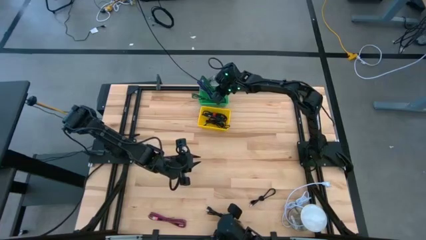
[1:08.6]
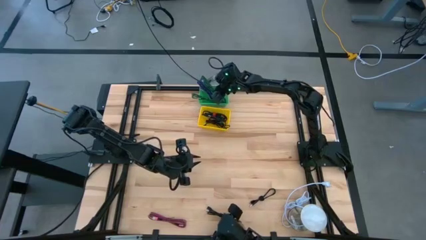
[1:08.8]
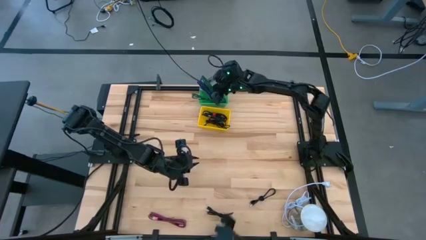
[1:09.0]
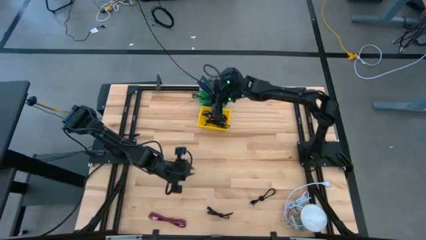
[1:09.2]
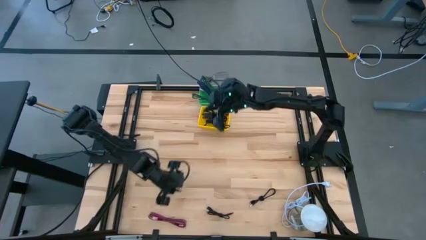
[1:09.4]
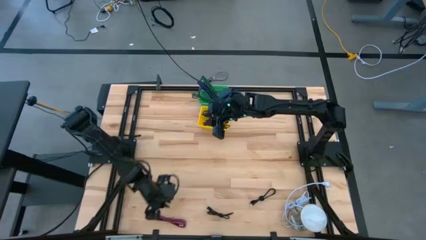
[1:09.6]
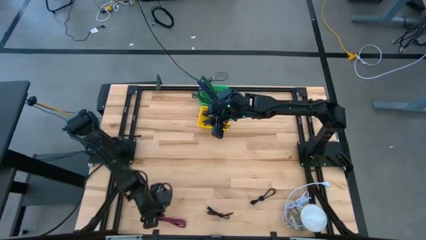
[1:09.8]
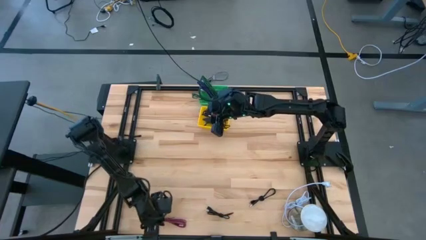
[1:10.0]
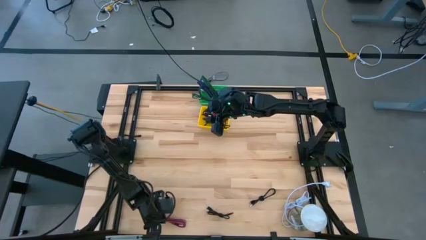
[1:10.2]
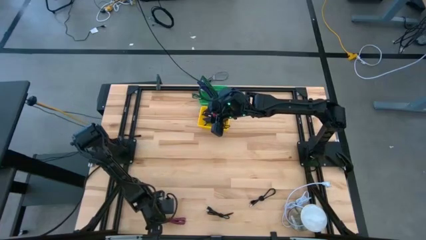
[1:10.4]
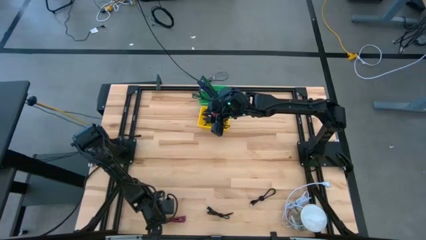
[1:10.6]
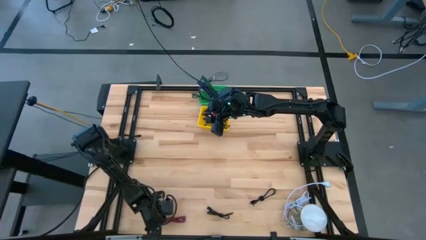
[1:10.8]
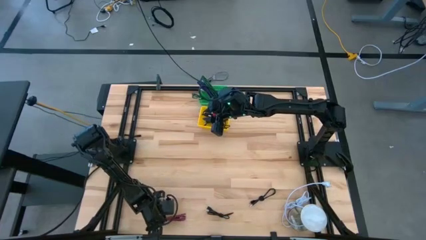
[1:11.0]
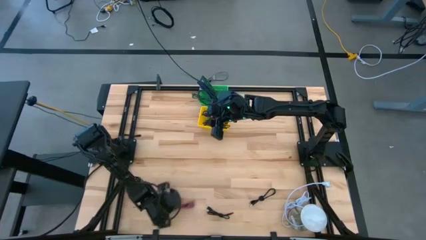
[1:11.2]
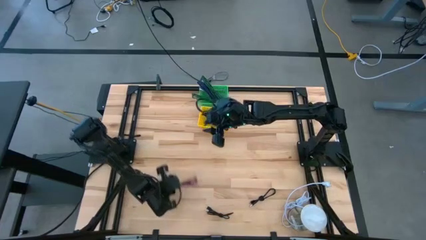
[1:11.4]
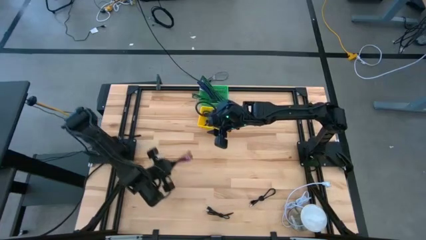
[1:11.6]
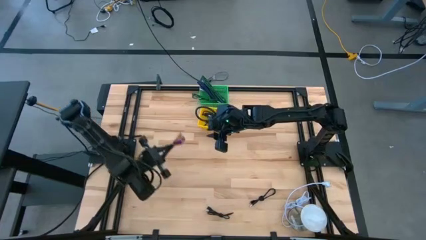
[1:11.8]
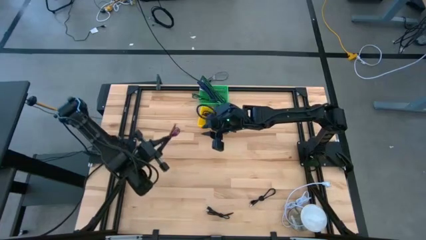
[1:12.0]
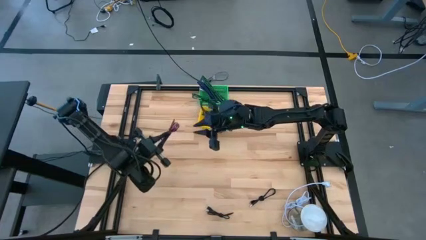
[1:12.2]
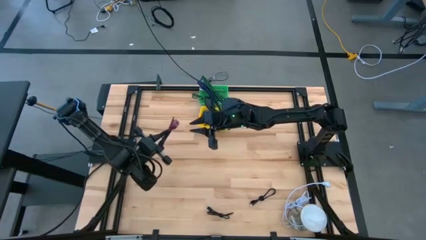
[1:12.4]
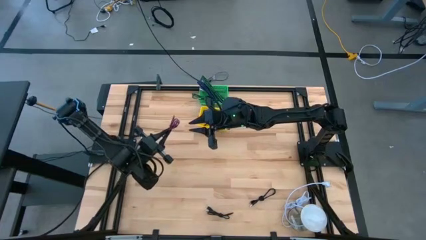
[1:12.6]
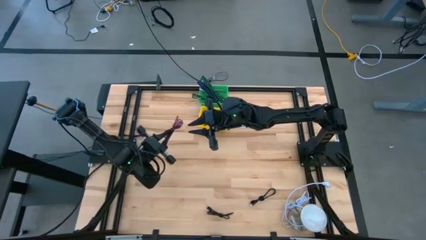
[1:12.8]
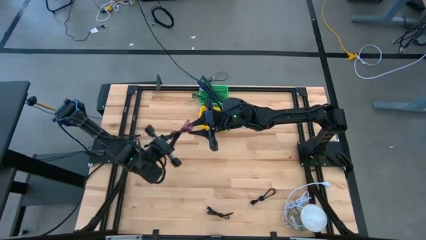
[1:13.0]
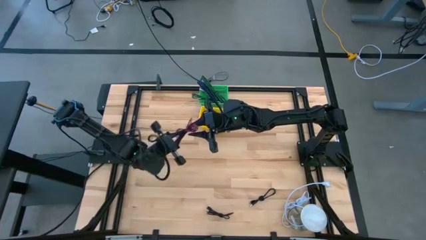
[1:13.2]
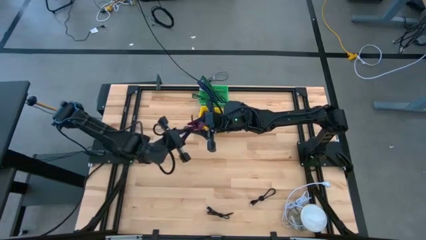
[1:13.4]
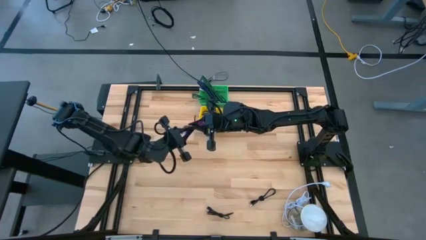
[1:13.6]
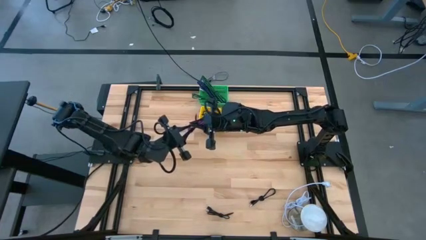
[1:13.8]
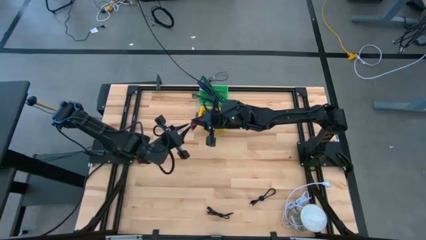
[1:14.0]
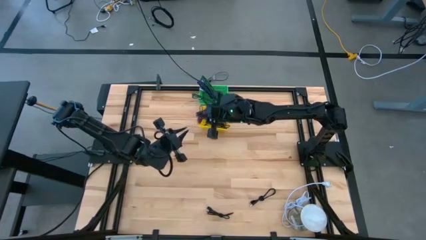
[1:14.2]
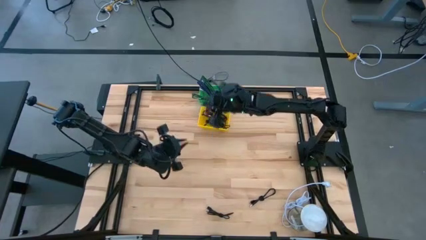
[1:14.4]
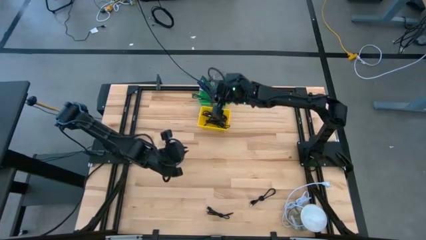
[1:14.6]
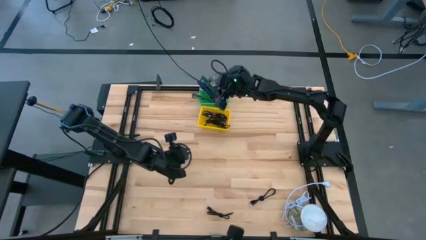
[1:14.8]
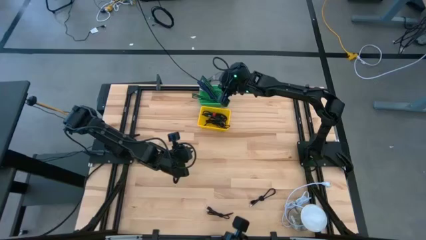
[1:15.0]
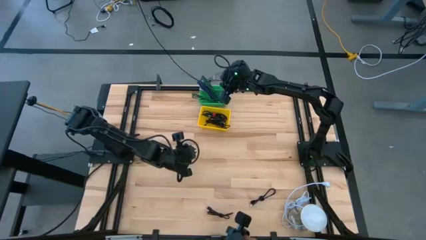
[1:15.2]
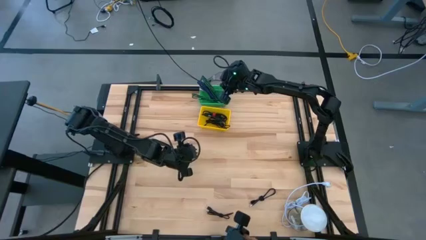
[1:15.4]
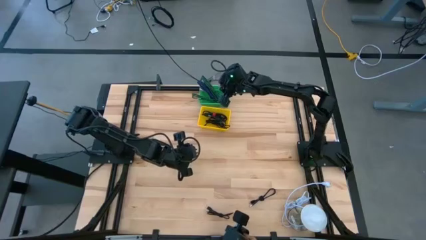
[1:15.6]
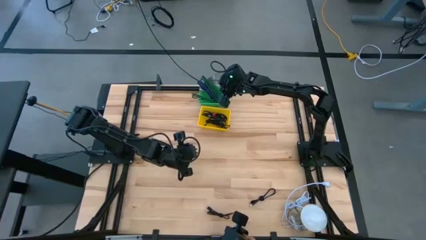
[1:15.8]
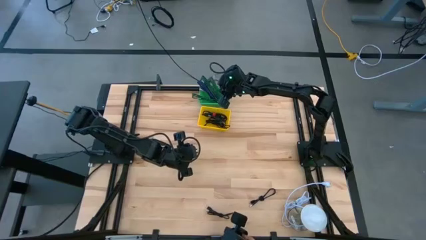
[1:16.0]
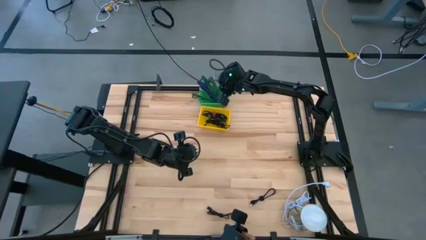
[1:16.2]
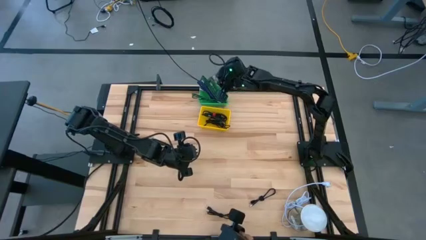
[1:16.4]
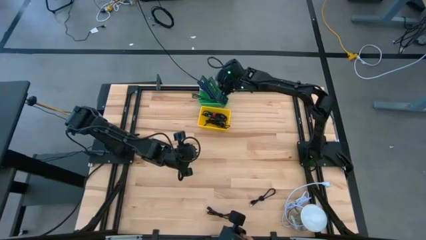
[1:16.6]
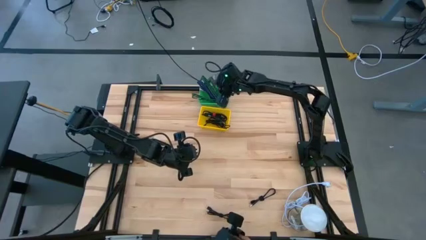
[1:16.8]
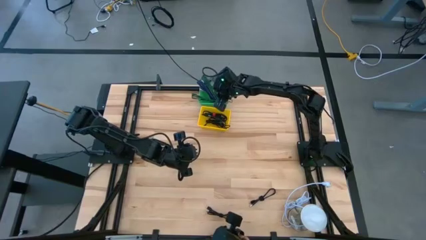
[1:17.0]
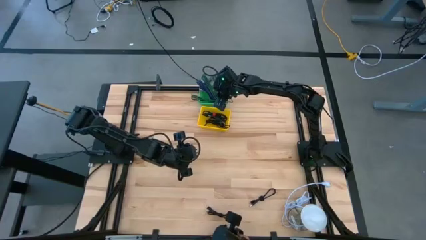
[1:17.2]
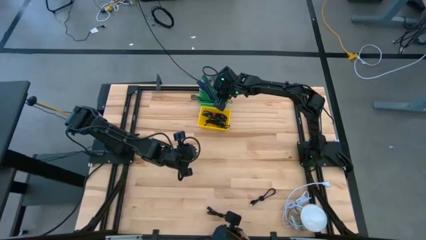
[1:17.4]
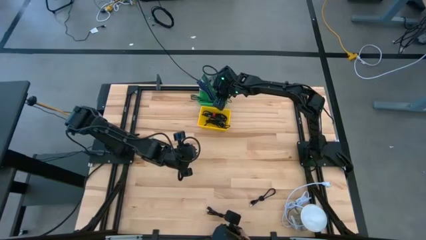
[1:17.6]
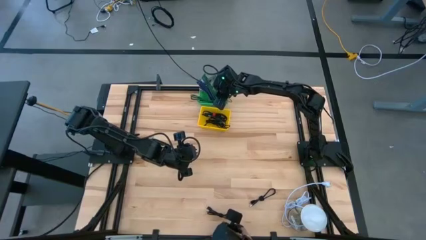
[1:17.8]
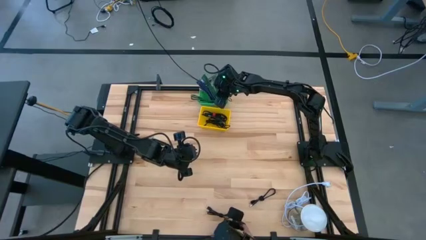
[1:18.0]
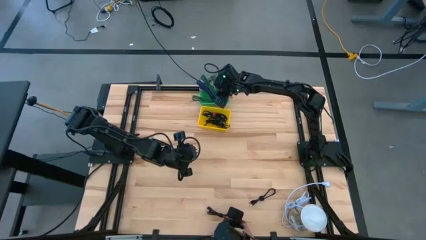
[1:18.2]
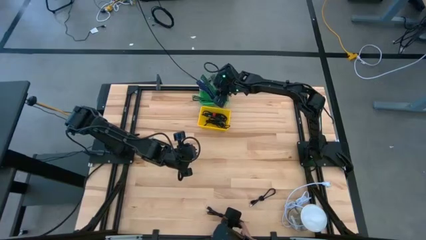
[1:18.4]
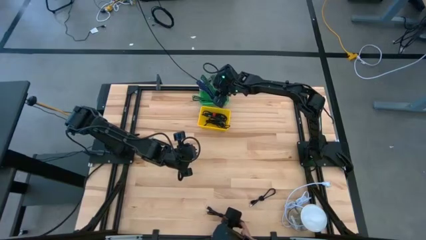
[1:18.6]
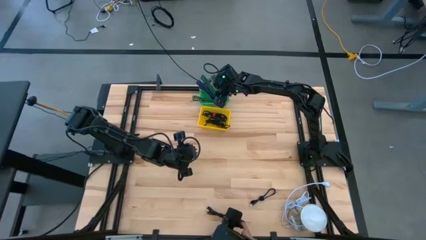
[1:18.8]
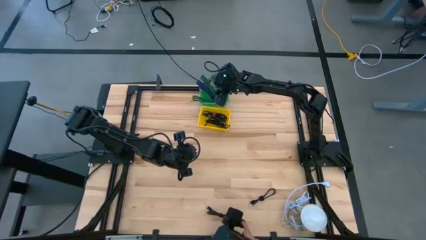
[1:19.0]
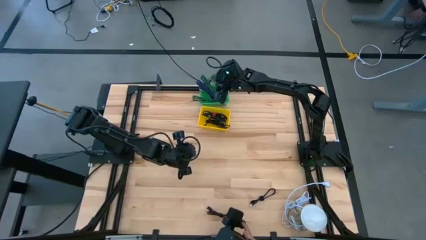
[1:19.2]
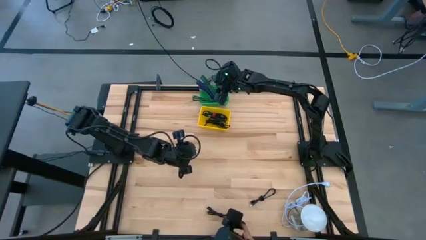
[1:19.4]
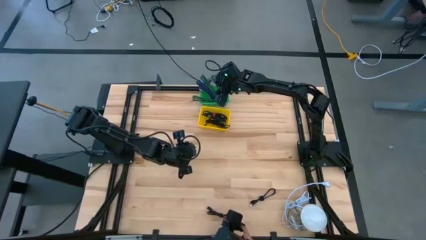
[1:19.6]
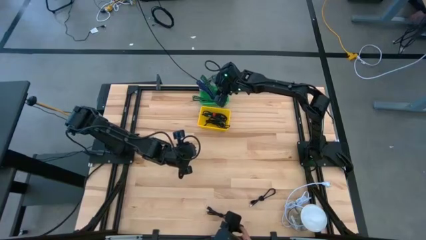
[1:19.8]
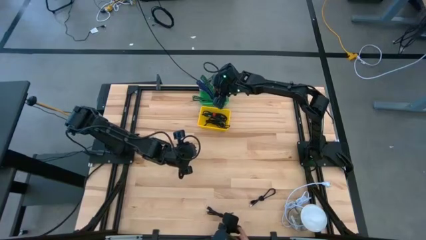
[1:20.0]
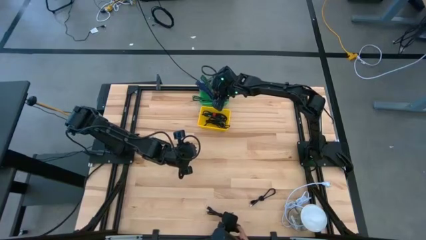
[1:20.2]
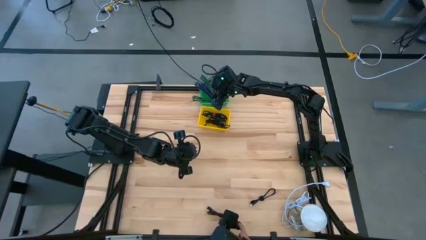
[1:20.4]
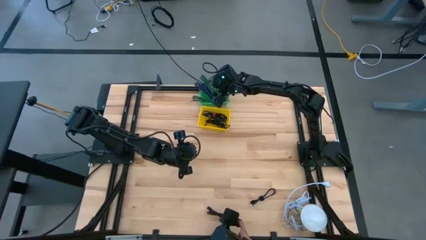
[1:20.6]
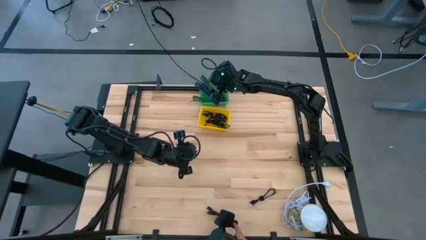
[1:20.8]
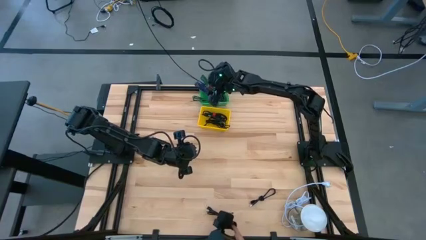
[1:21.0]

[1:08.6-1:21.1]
Task: Pick & Place USB Port
Put the pink charger cable into the green basket

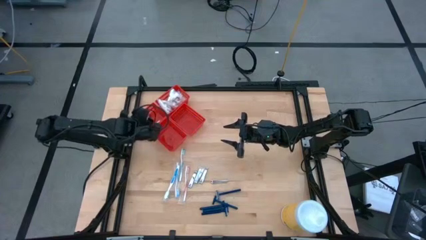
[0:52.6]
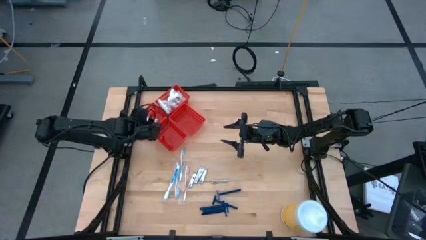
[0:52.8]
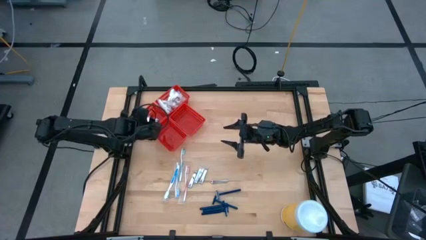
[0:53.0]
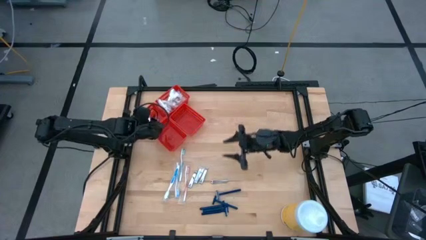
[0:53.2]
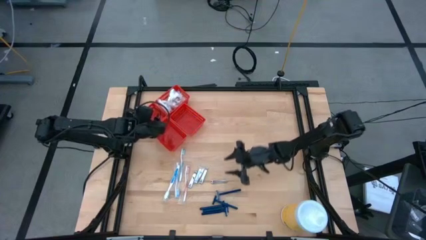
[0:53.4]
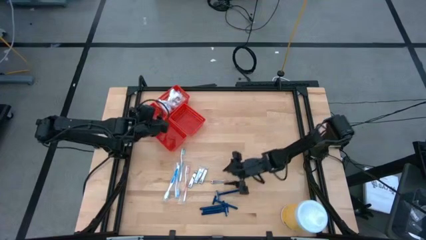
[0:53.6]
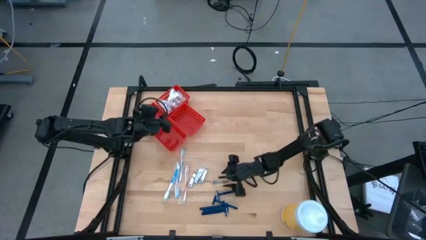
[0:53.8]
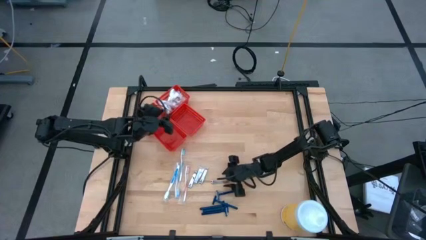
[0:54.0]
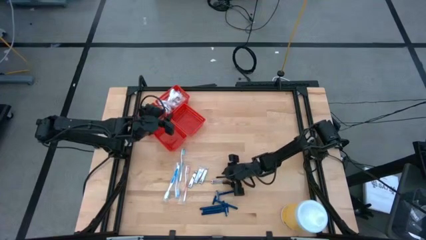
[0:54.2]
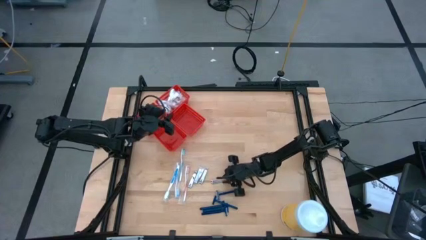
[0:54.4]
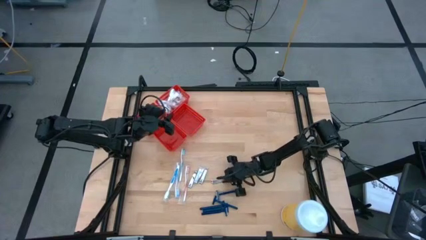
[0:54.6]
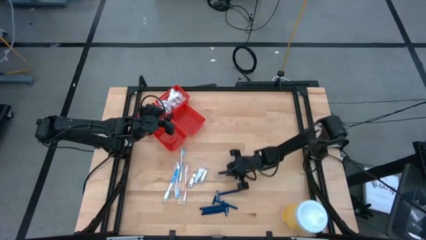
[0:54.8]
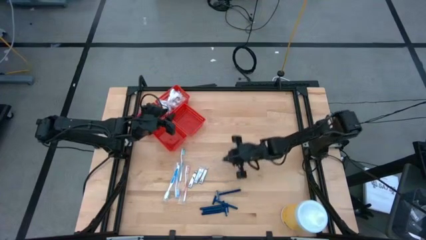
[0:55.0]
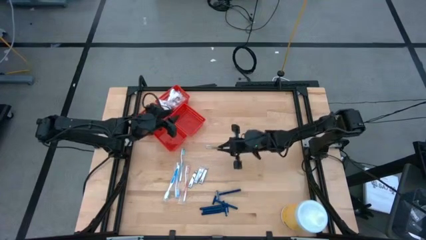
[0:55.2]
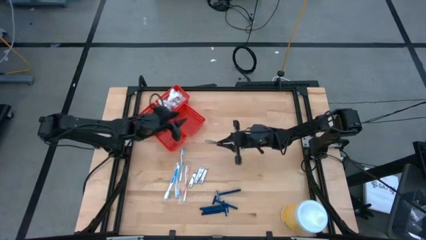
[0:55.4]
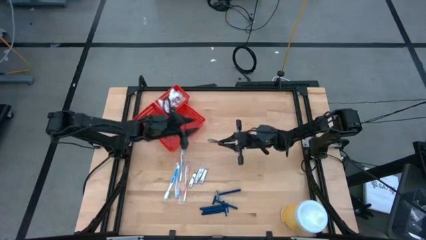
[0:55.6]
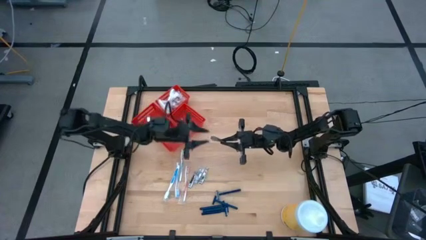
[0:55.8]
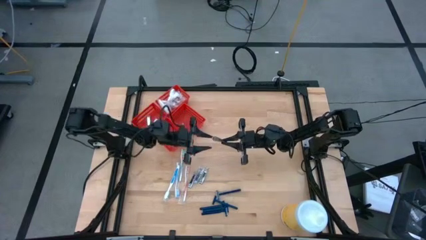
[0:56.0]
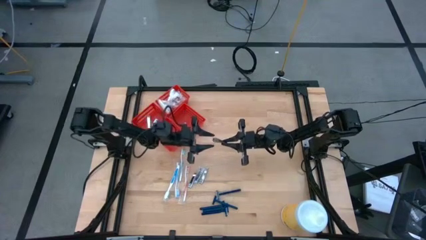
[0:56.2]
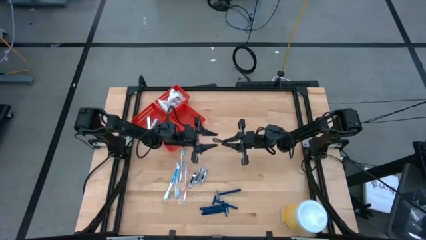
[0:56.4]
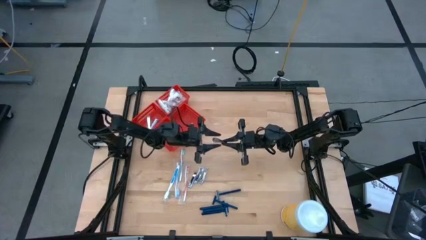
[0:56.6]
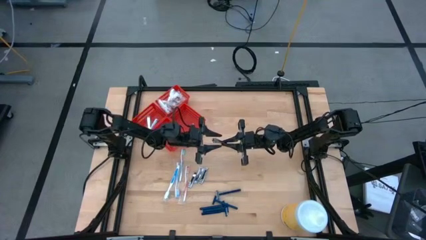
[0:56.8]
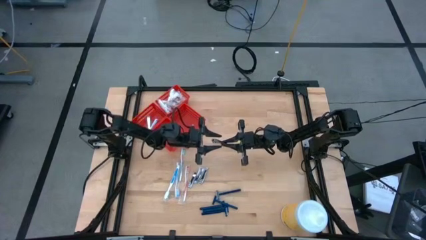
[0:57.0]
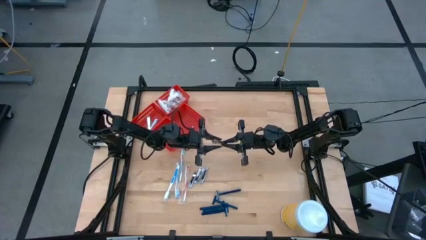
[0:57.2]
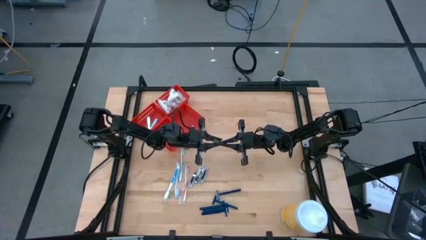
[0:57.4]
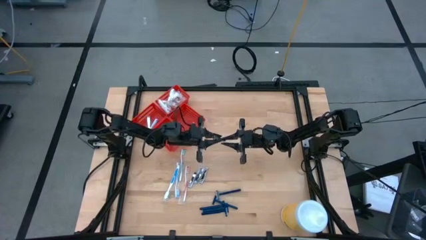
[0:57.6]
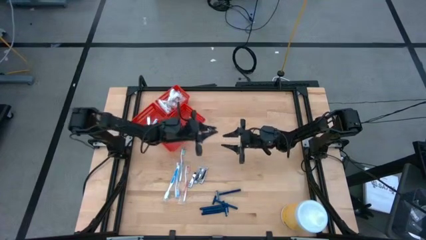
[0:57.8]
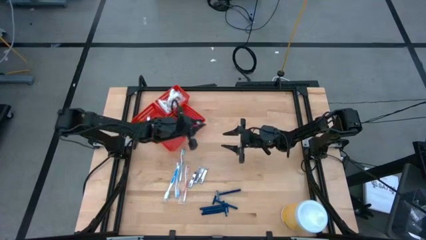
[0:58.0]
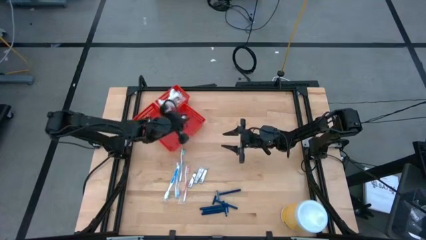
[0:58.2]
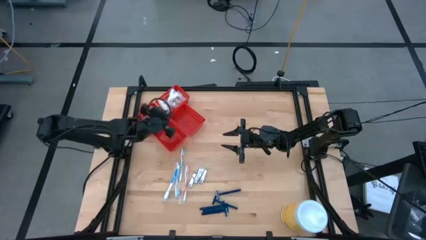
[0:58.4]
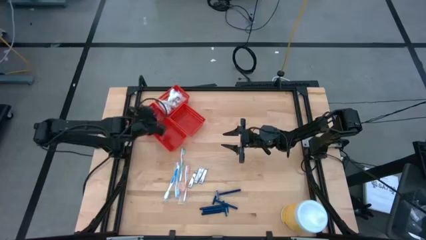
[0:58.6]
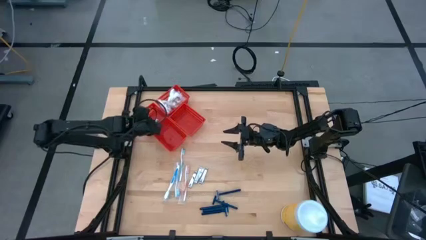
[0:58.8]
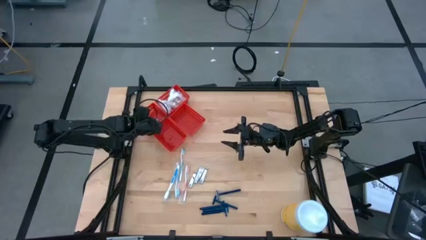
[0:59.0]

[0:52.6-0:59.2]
Task: Pick & Place Travel size toiletries
Put the nail cutter into the horizontal left red bin
